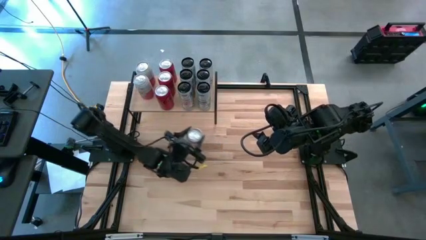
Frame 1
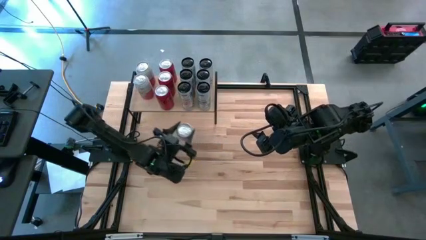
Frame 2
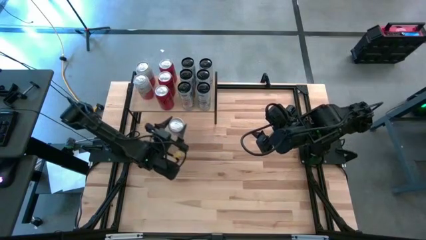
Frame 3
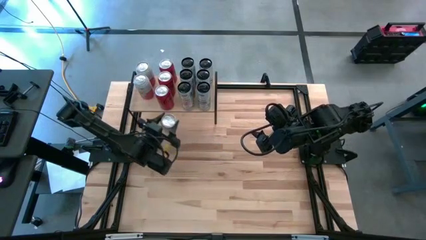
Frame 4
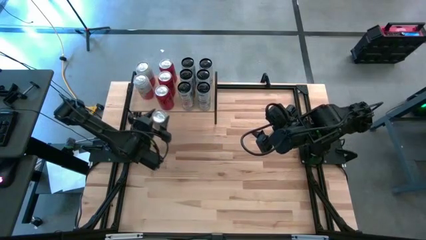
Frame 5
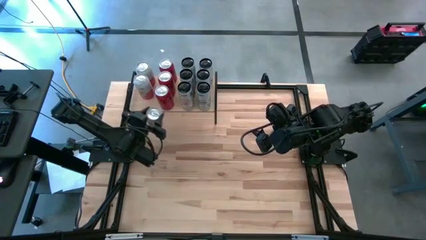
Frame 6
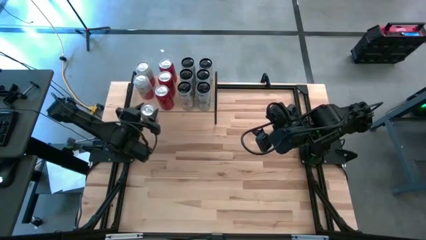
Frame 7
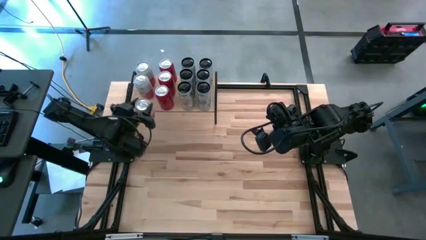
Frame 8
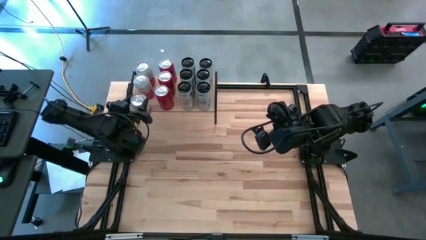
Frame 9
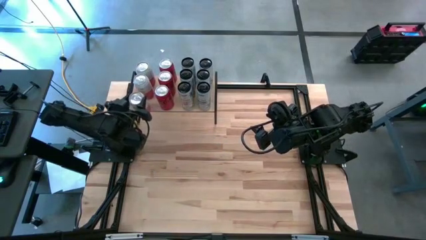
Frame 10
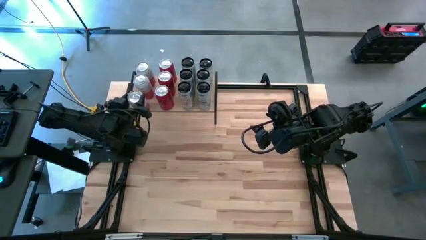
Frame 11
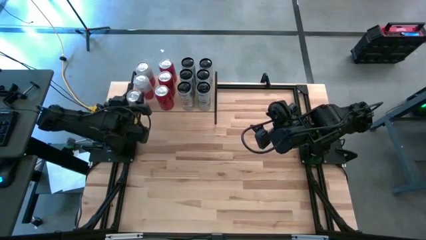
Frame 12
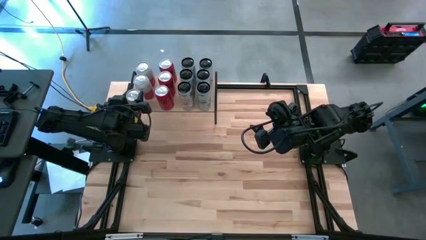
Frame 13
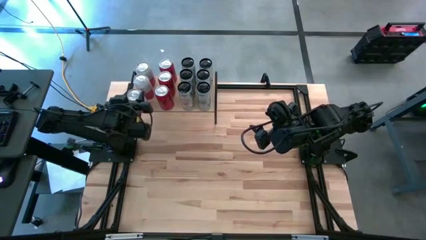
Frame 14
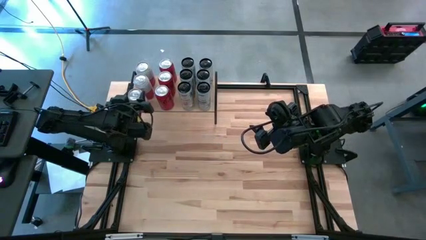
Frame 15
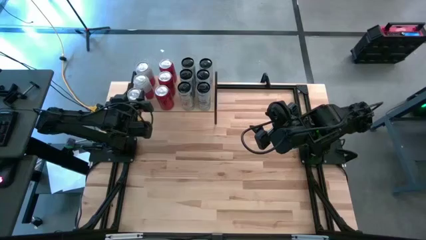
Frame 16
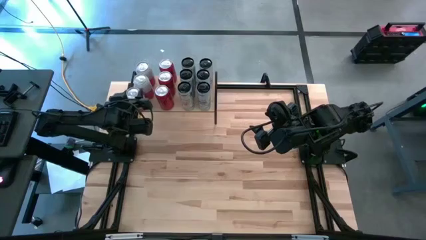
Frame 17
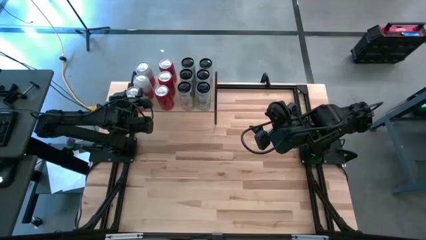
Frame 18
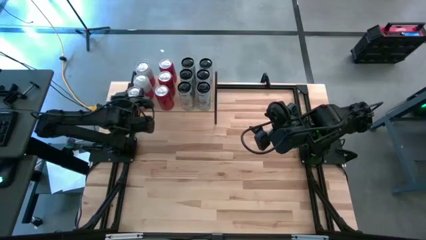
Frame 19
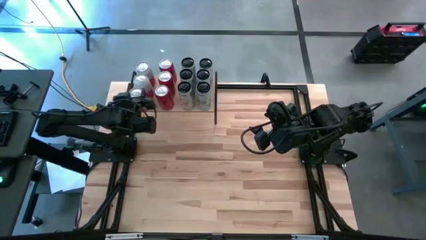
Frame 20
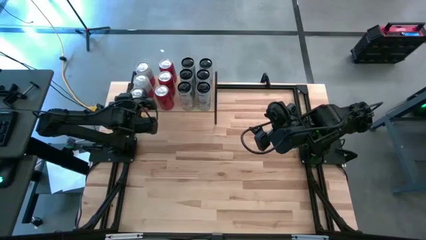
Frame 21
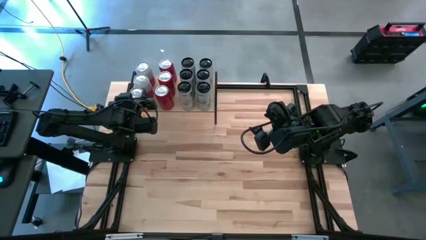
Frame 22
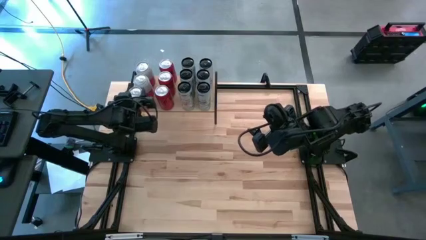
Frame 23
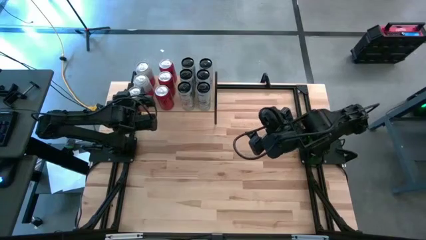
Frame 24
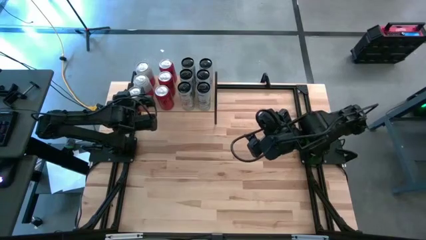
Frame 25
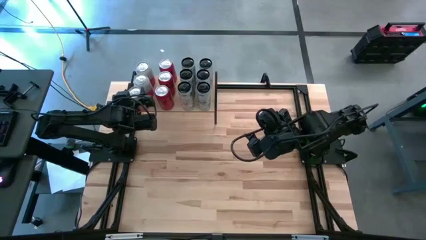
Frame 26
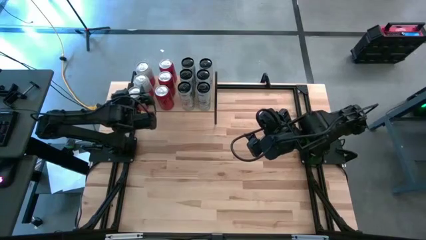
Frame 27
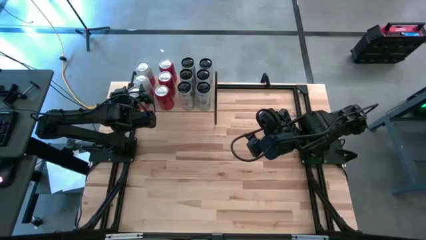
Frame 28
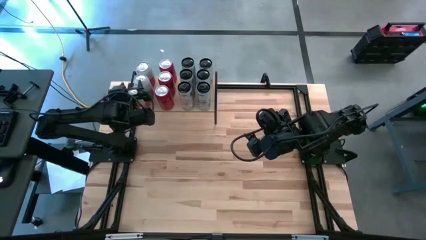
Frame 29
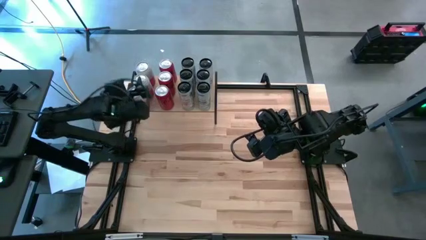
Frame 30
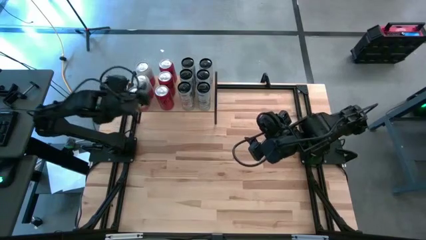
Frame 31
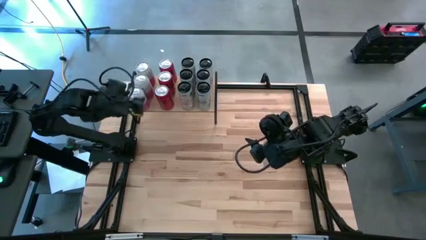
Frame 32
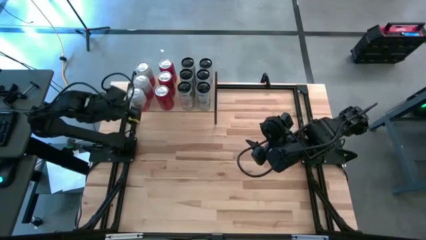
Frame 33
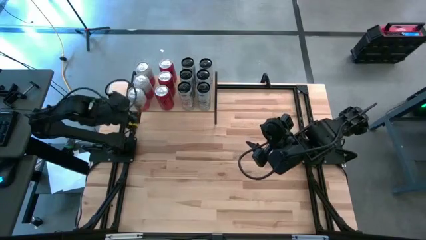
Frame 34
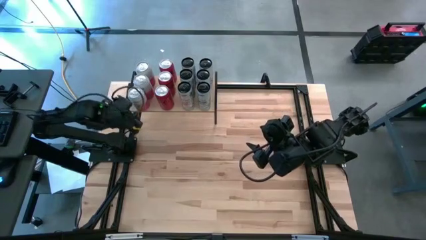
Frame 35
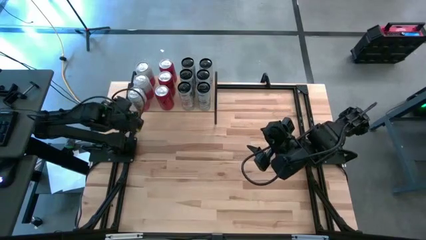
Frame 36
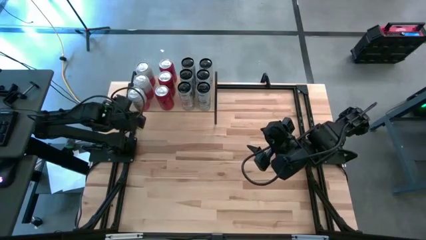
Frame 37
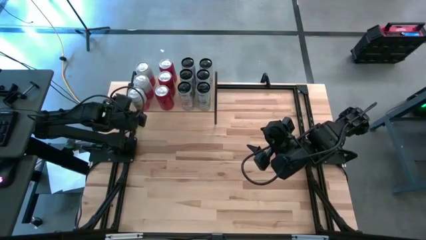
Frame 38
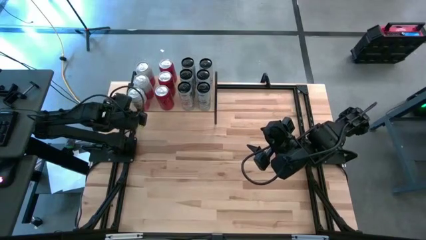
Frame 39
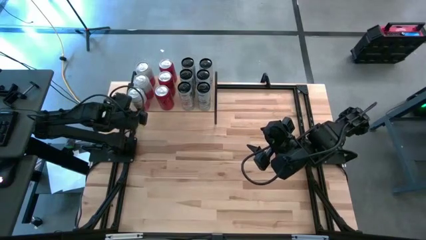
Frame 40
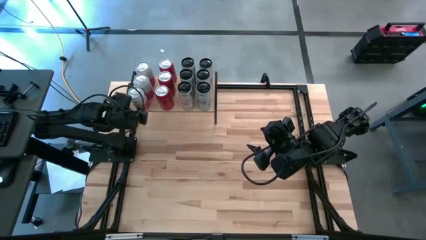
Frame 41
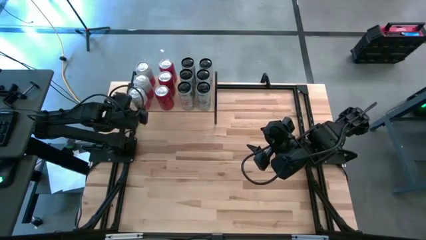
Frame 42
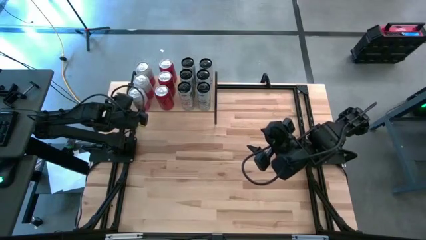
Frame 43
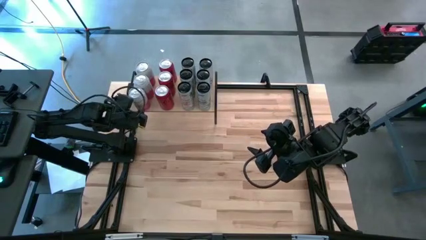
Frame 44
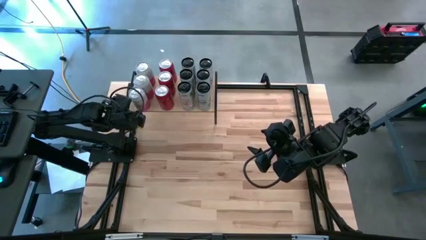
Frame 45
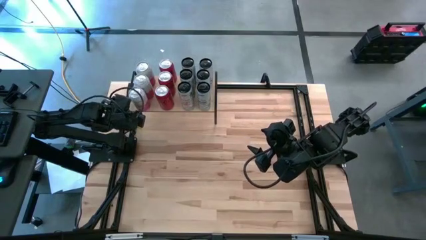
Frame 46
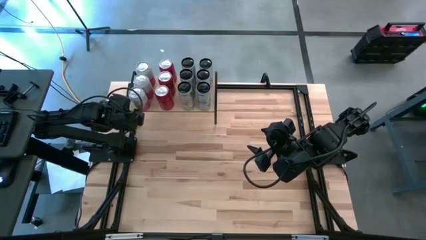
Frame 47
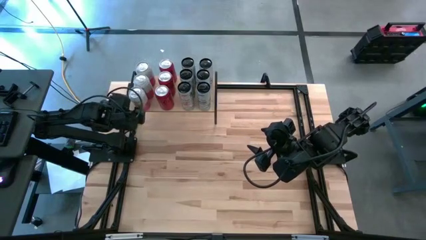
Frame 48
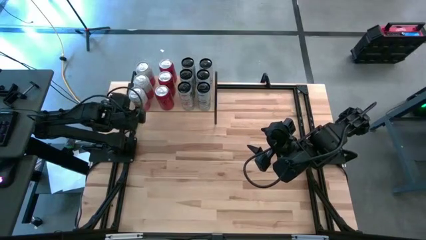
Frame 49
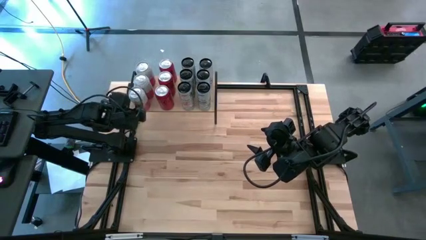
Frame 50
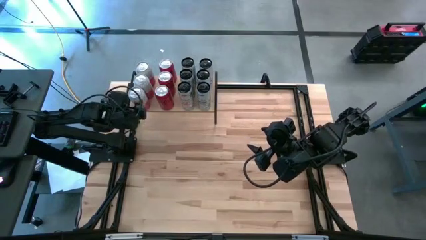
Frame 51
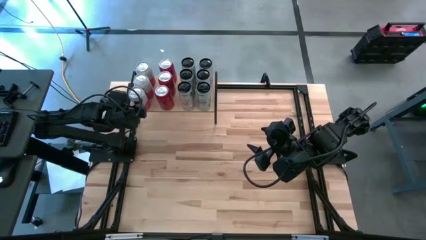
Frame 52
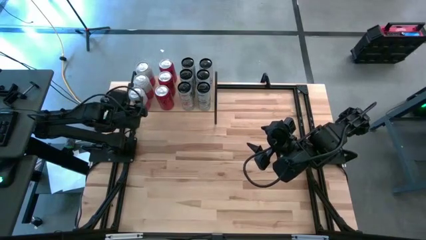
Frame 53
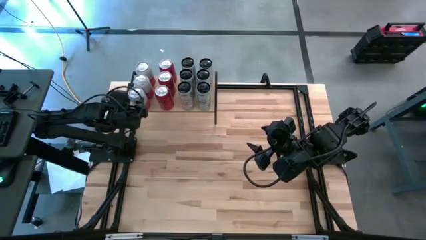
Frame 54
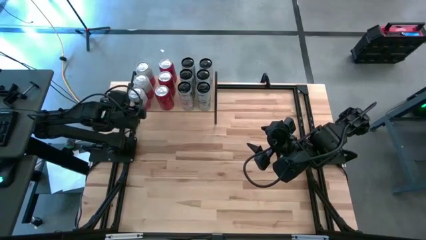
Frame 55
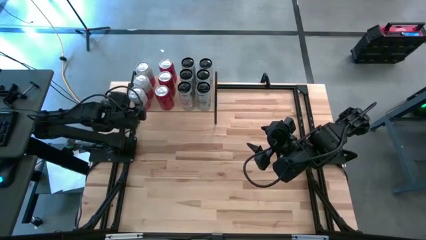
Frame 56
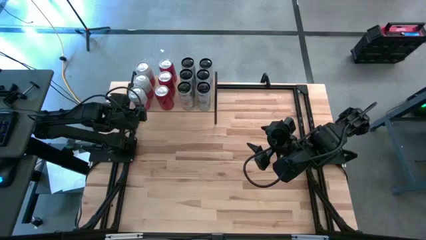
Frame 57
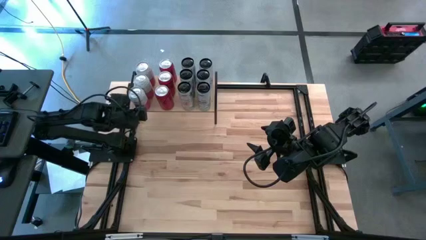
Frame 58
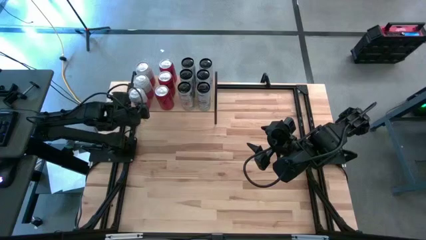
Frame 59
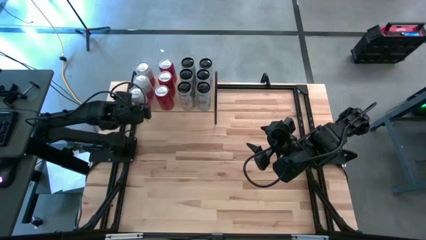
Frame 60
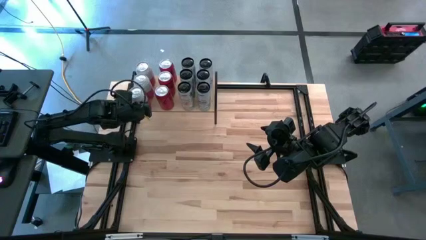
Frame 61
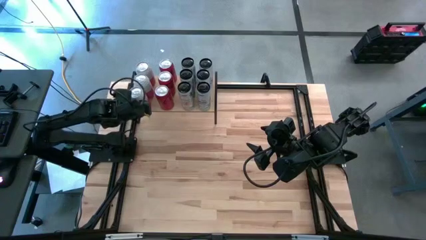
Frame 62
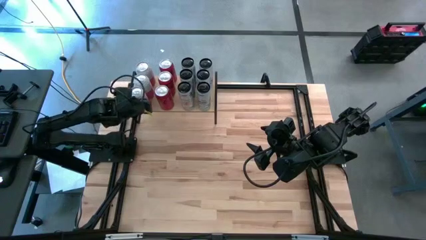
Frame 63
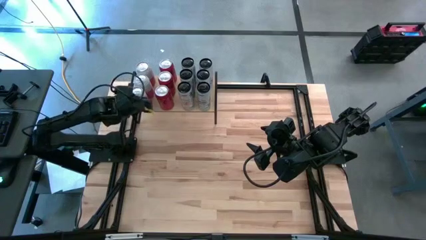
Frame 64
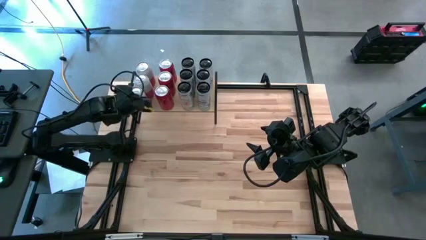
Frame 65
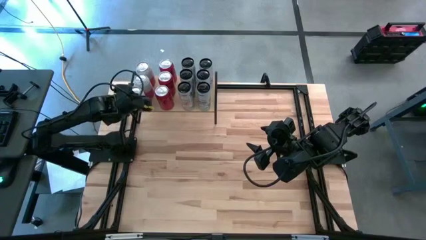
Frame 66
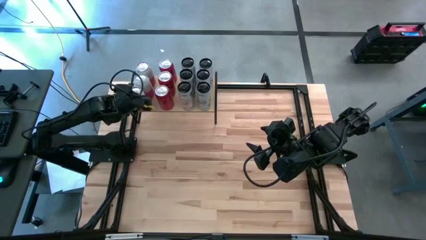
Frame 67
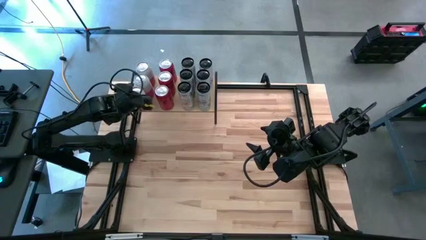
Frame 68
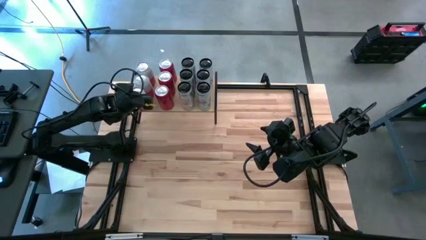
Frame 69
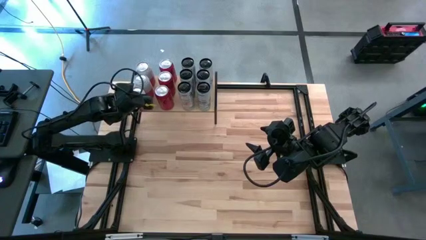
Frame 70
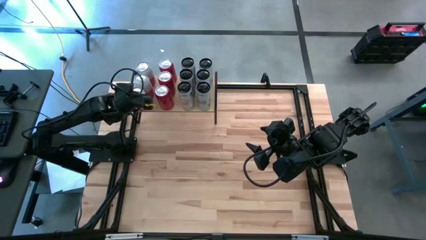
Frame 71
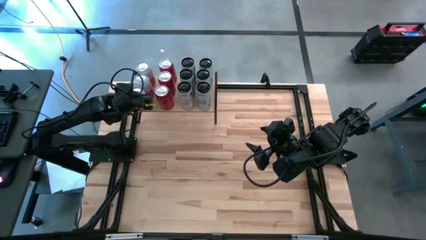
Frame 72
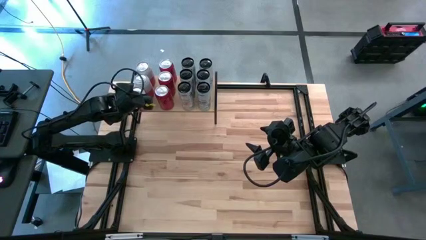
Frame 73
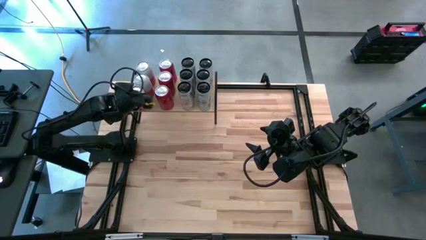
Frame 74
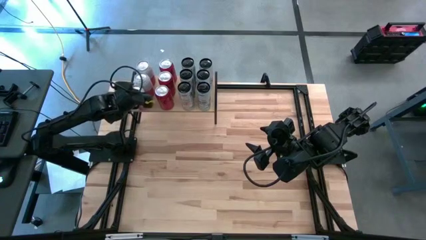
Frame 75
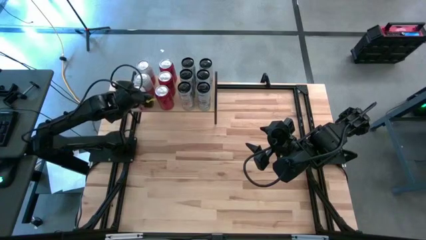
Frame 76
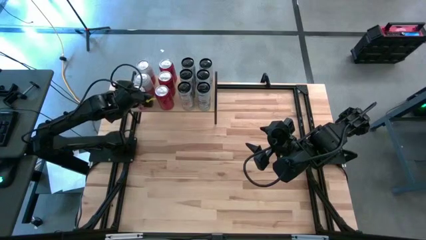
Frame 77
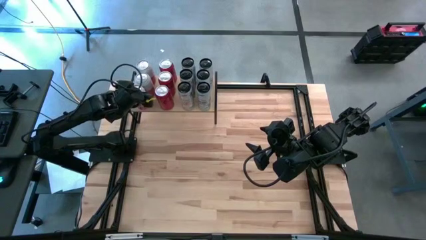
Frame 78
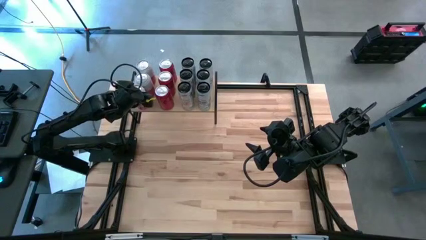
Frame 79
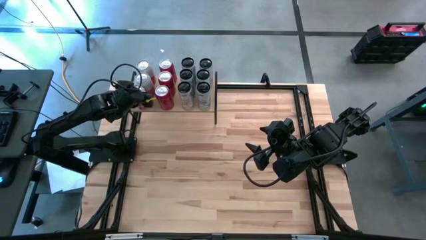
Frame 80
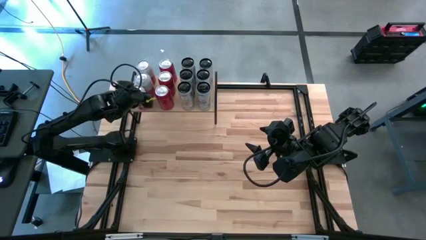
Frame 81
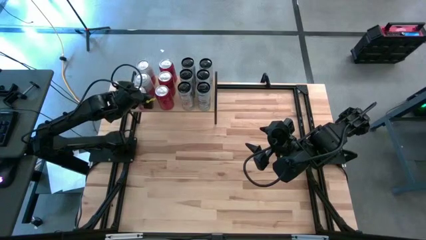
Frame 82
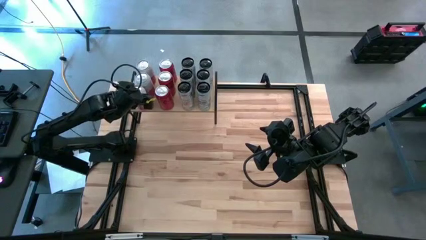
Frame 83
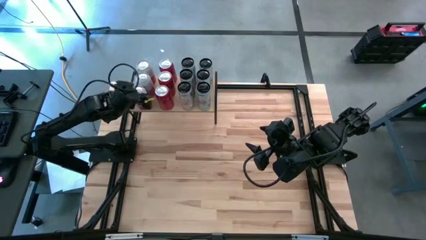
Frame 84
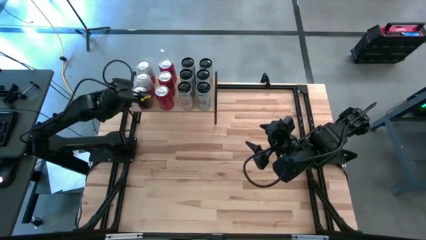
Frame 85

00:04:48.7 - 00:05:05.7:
Task: Place canned beverage on shelf
Put the pink soda can on the shelf aligned with the other pink soda cans
